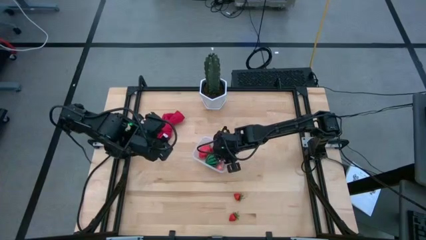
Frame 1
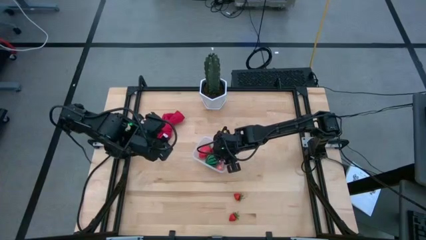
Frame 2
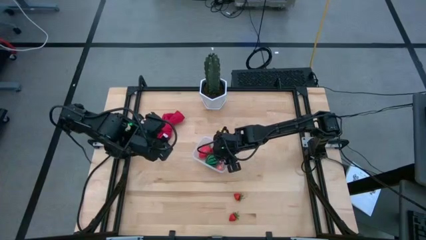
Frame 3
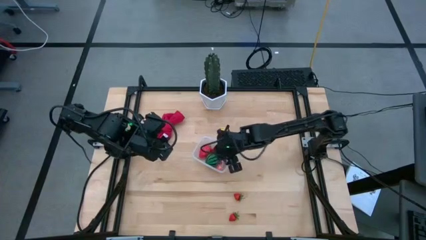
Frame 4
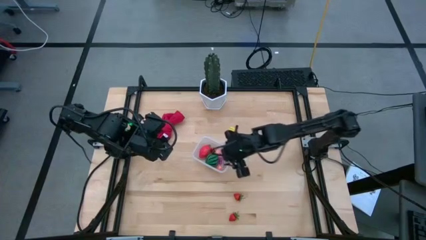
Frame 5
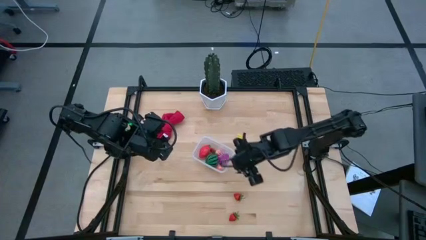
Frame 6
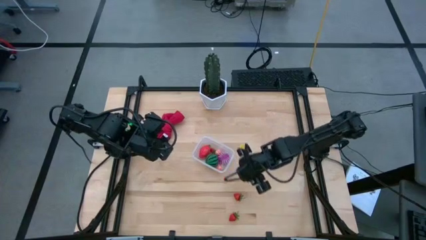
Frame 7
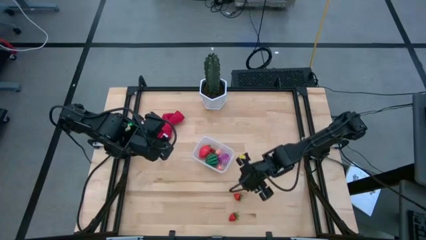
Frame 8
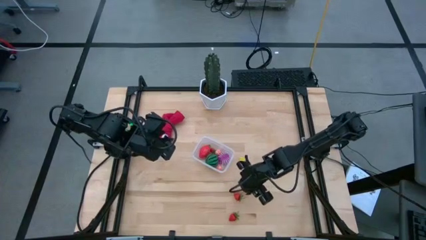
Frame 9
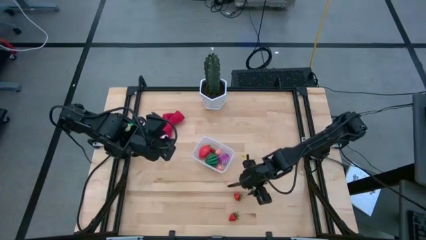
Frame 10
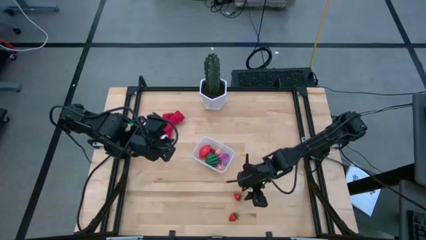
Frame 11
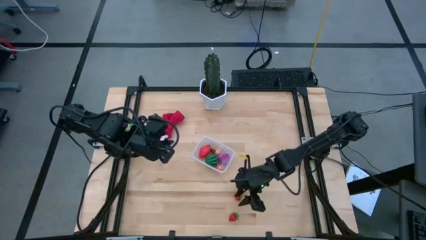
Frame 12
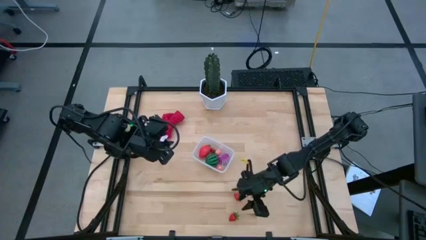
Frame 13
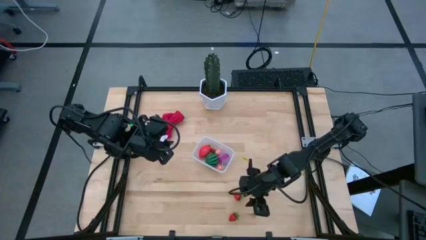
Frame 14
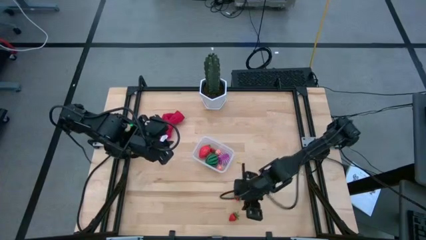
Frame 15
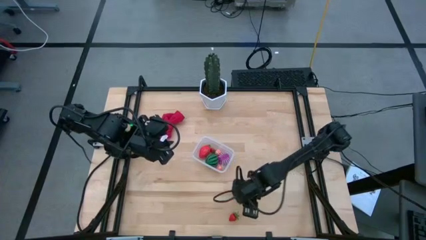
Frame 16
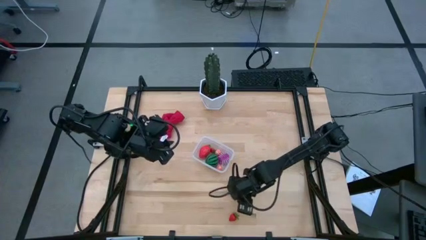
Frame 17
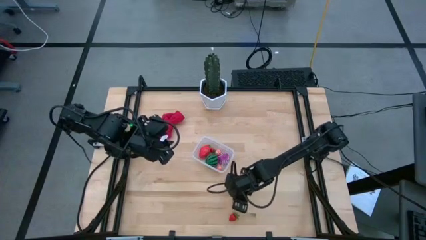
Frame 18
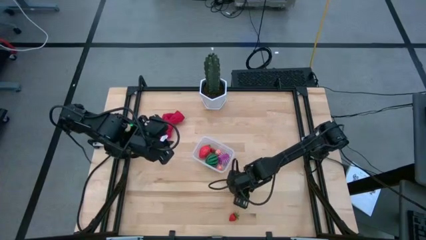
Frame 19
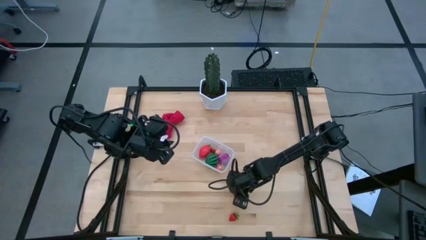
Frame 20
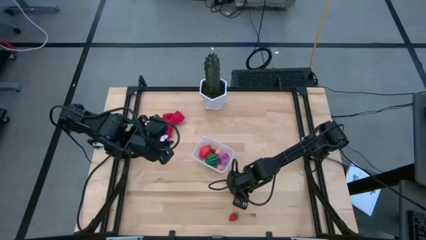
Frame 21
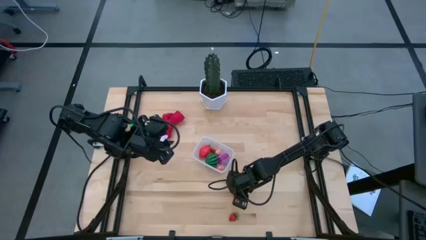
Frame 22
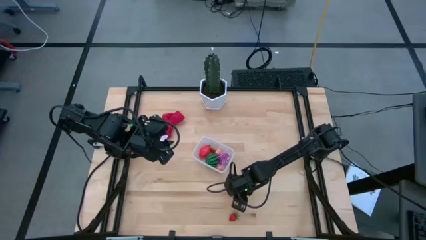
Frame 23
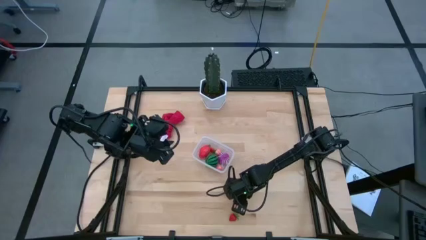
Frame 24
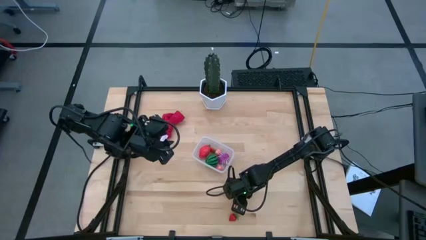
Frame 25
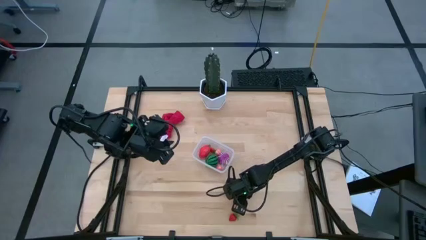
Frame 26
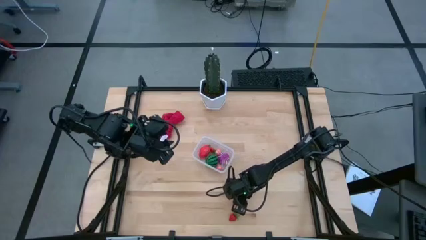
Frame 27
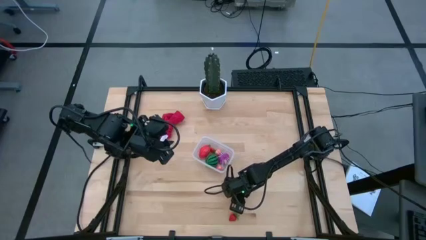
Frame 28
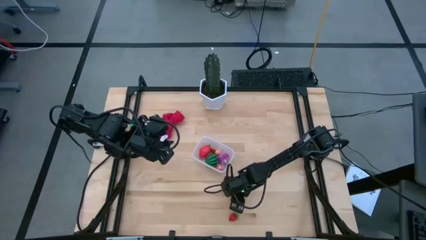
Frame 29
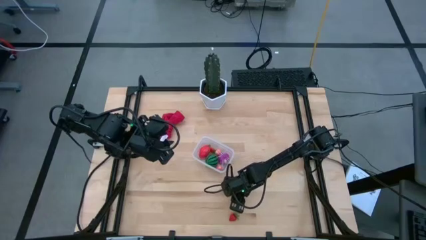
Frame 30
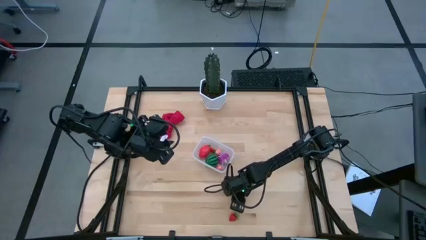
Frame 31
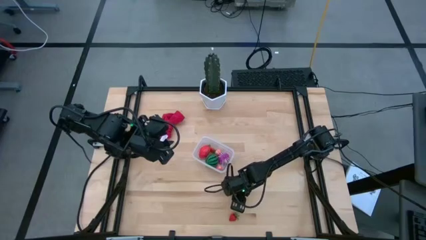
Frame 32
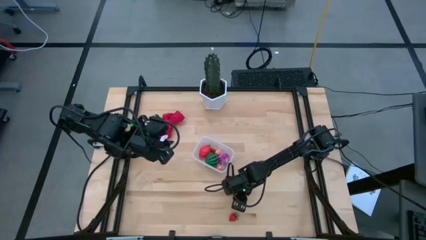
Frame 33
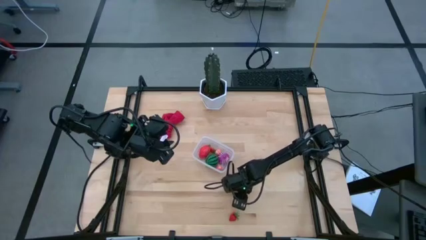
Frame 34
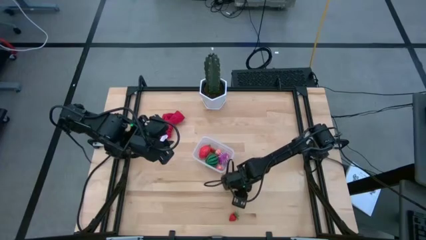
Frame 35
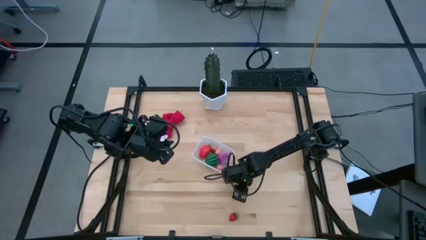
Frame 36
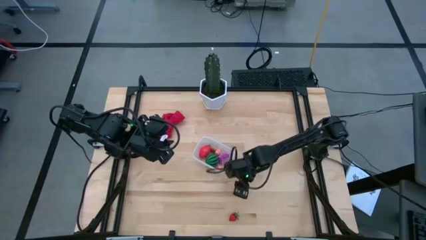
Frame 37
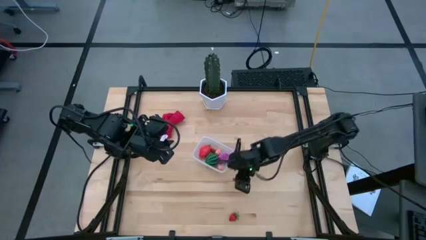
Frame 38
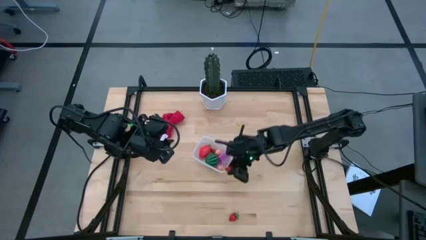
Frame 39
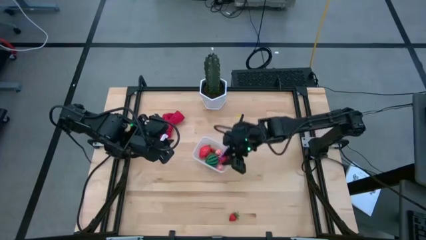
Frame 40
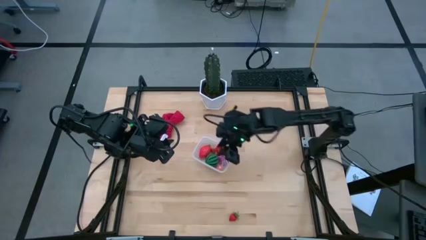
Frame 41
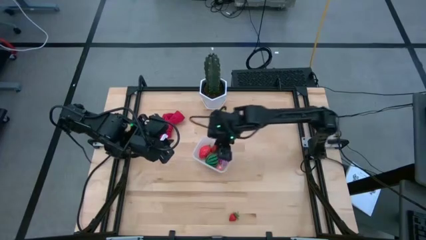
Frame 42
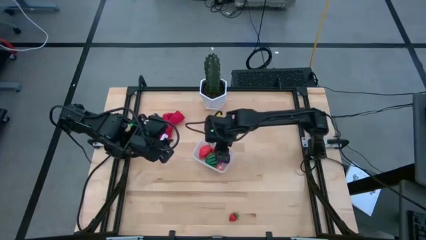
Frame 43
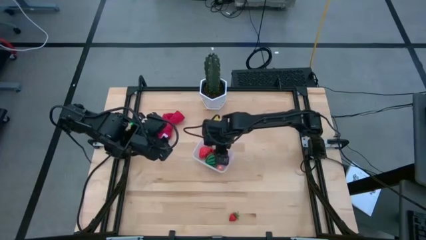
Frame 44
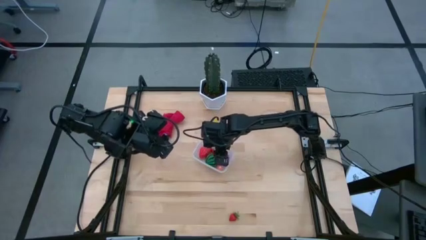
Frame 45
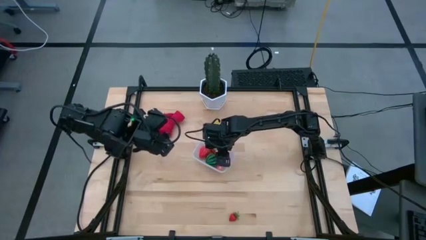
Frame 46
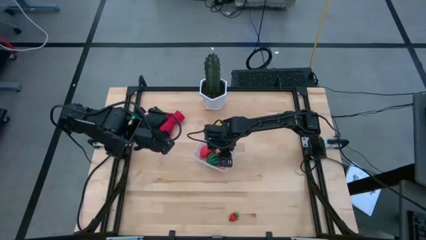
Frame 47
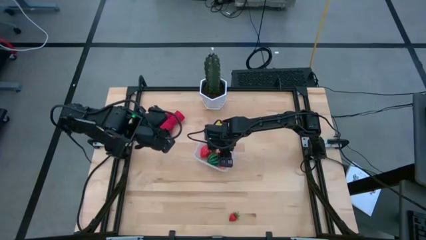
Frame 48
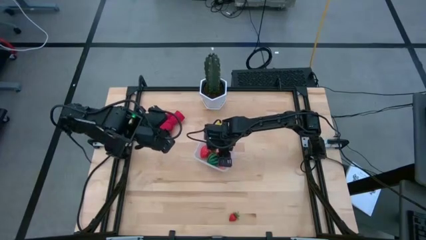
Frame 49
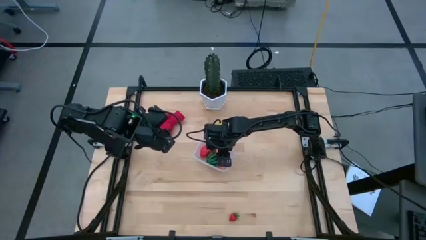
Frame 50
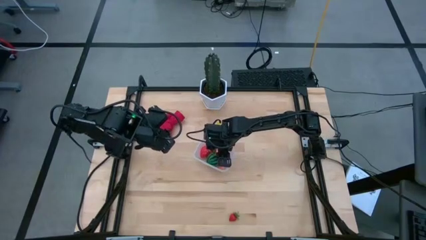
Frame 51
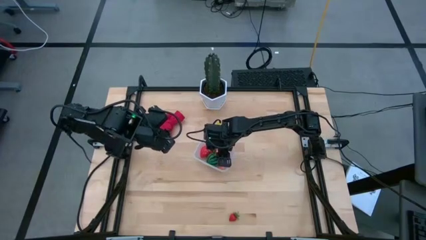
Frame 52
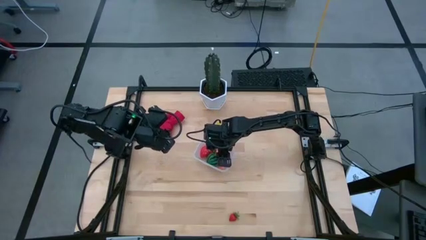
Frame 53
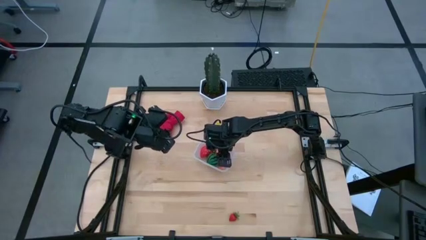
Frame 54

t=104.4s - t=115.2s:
Task: Pick and placing Produce into tupperware
Put the top red strawberry into the transparent container

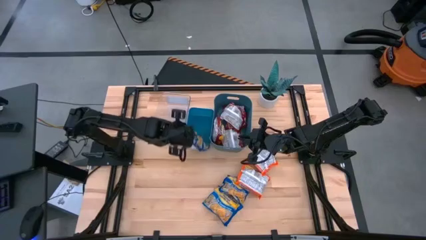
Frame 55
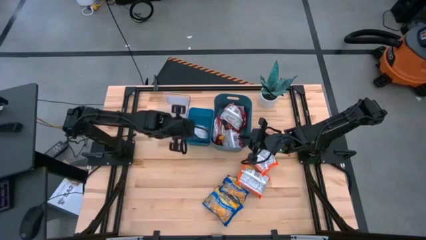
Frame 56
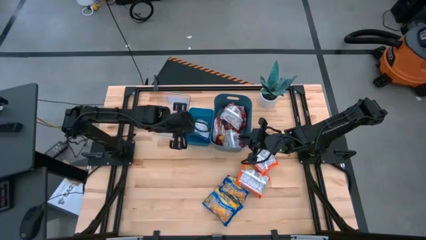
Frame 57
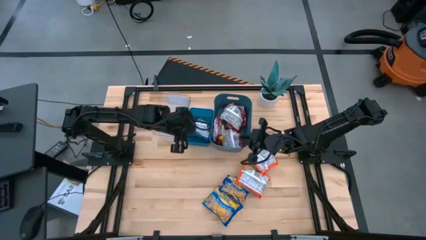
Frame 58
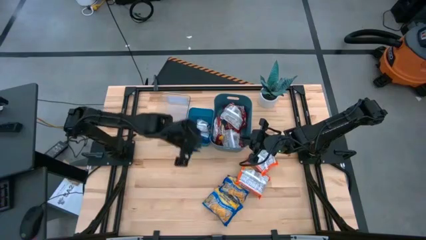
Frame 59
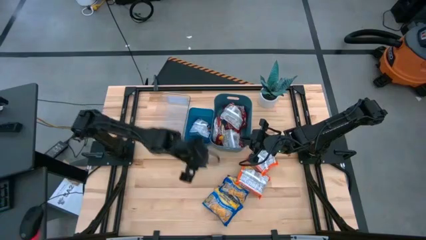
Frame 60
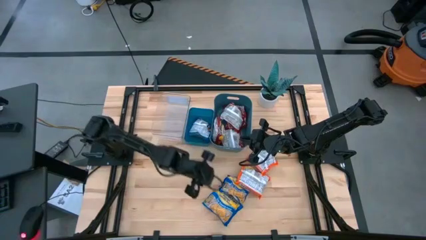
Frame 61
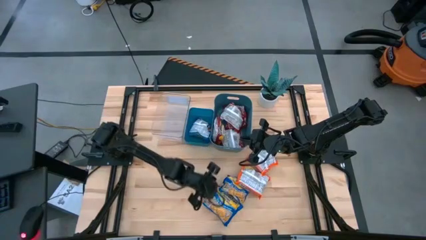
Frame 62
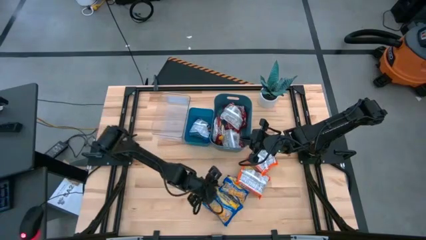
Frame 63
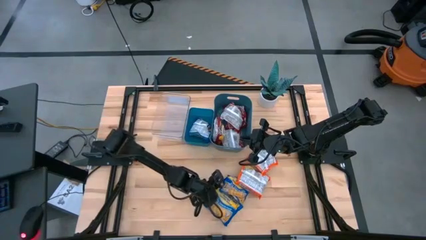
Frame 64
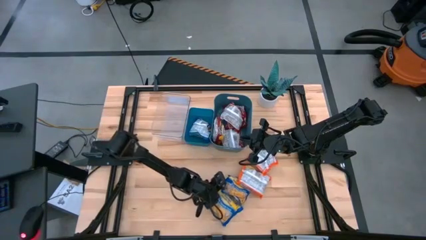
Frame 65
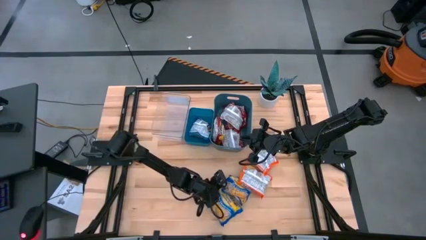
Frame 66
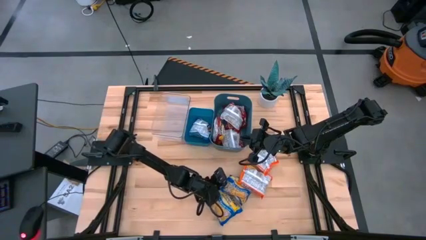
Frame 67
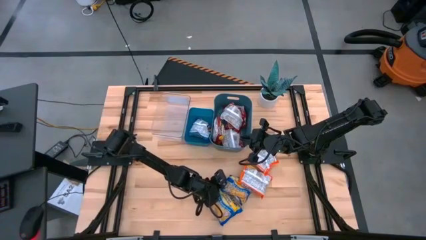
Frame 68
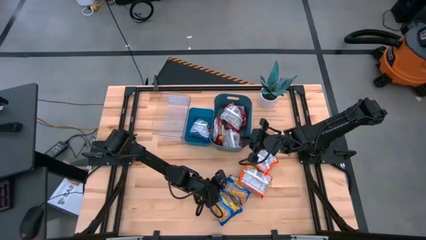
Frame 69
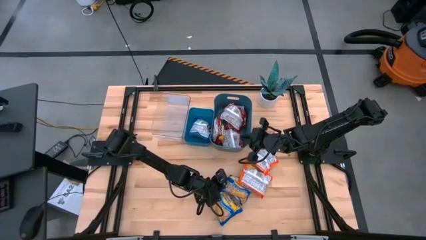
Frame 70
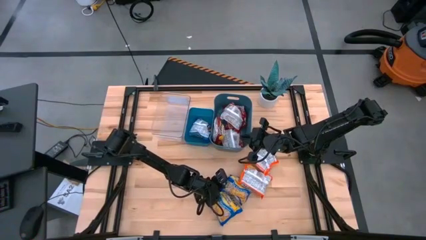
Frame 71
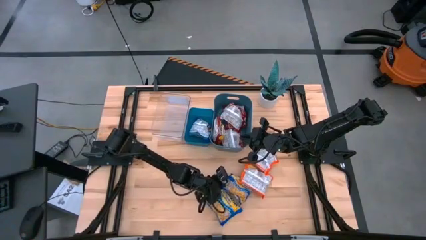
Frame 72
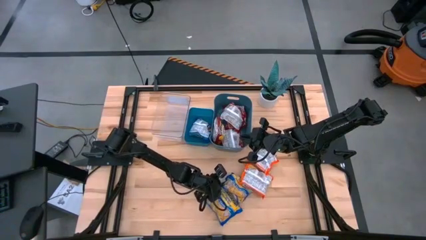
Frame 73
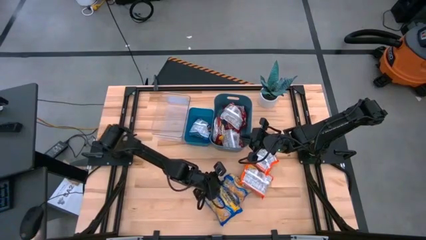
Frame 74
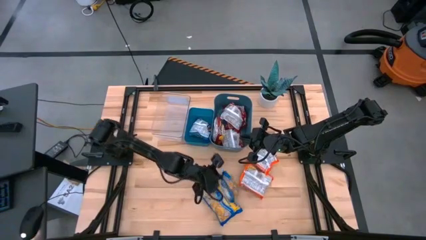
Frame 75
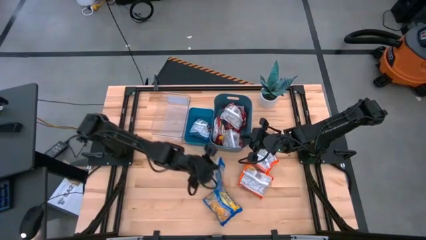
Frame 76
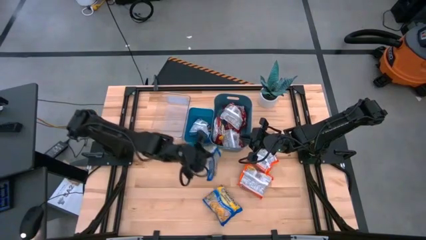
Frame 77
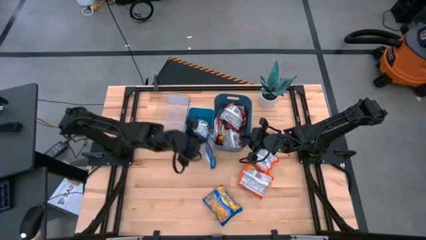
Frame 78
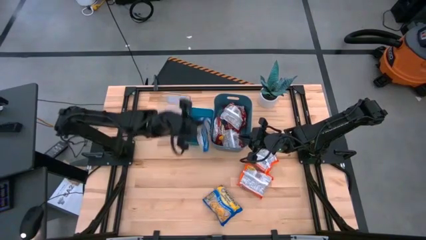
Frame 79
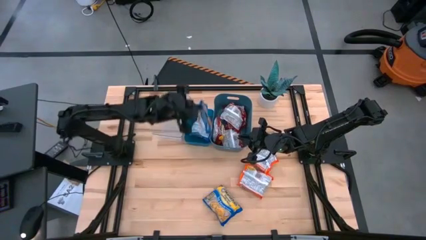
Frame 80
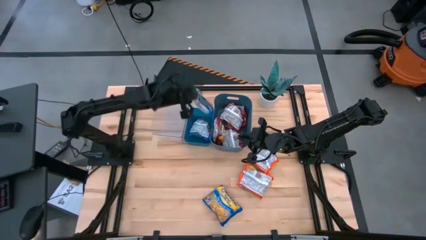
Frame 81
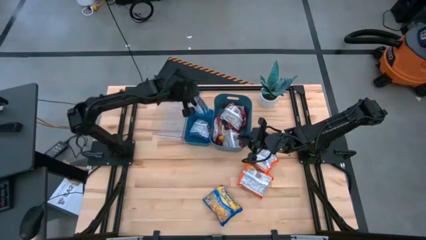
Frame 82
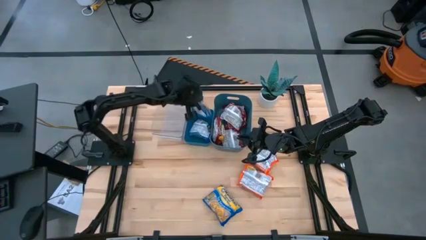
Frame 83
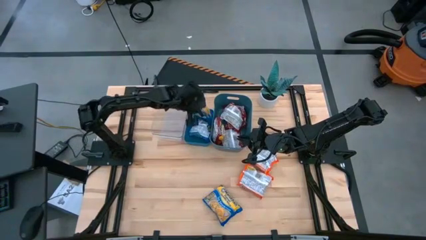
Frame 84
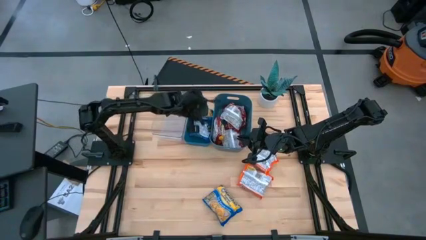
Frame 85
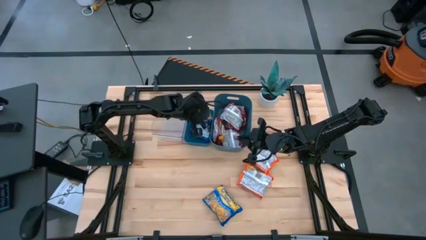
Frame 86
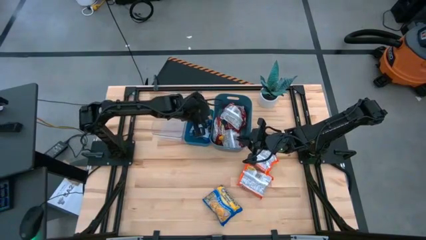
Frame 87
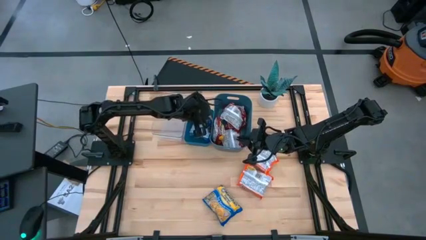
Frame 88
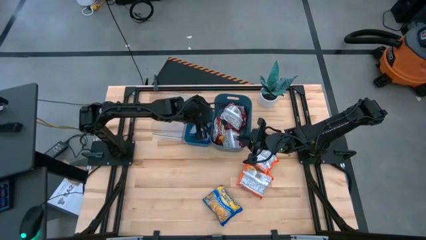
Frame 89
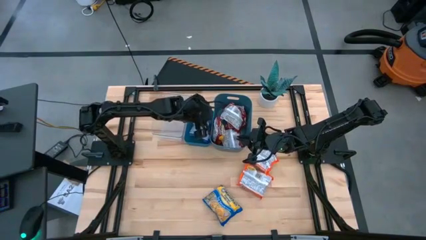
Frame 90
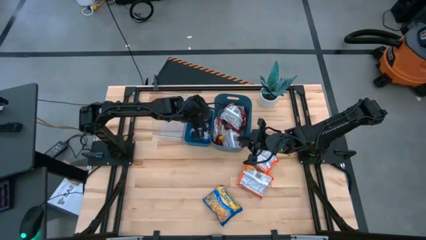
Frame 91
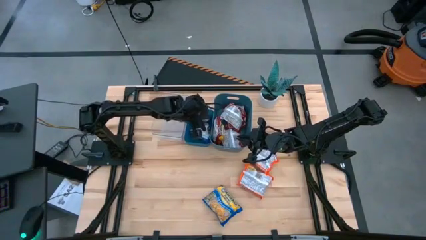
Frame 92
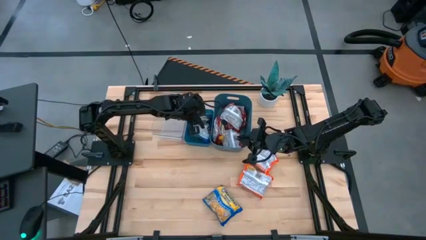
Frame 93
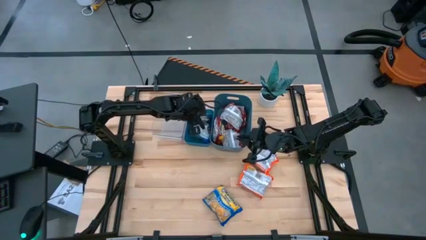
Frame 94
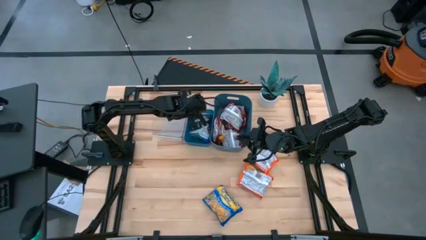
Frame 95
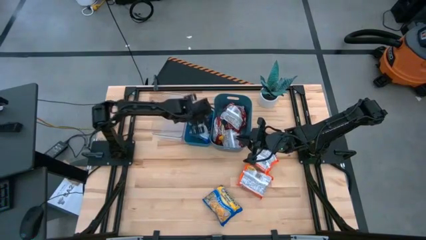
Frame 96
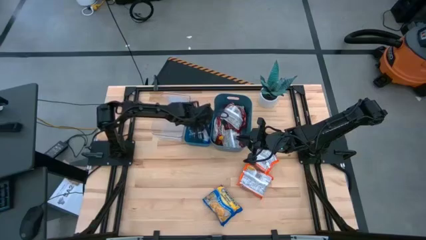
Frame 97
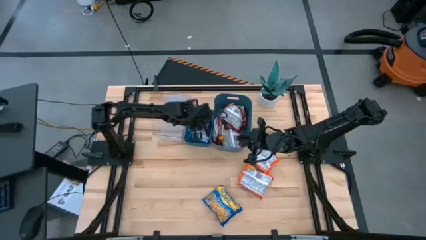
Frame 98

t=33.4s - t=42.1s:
Task: Sort Maruchan noodles
Put the blue noodle pack into the blue bin
